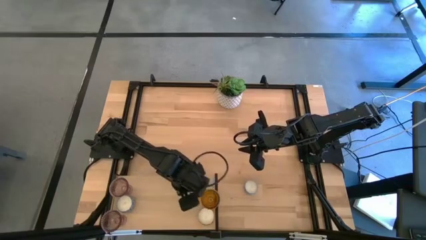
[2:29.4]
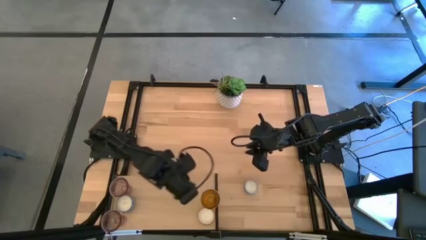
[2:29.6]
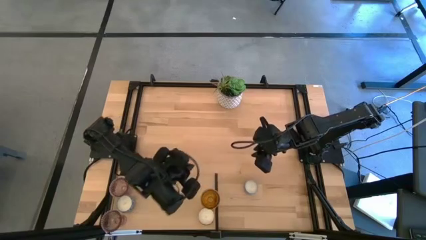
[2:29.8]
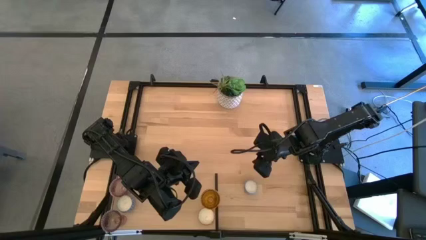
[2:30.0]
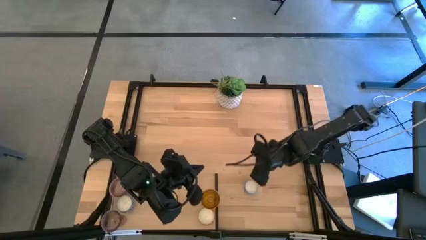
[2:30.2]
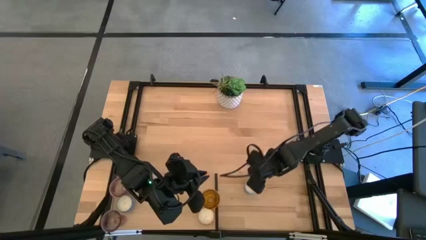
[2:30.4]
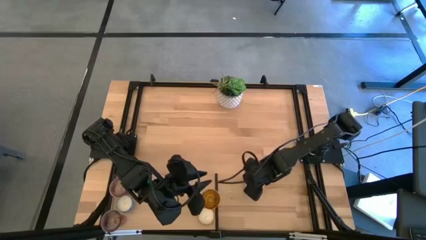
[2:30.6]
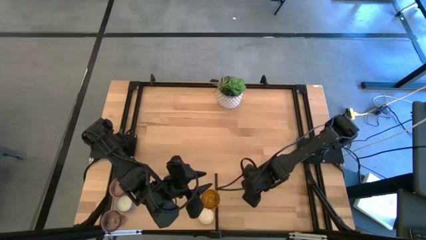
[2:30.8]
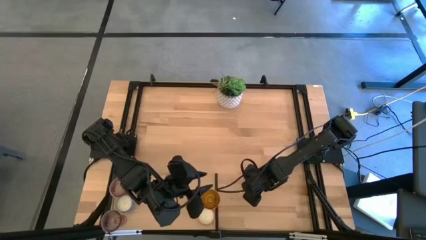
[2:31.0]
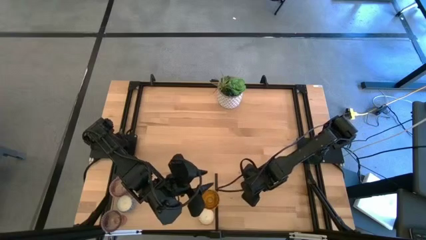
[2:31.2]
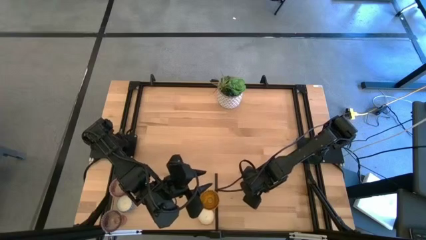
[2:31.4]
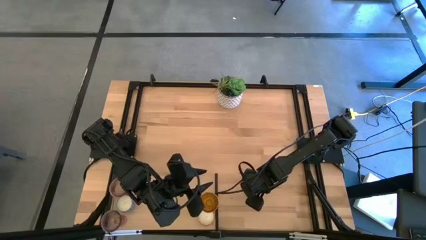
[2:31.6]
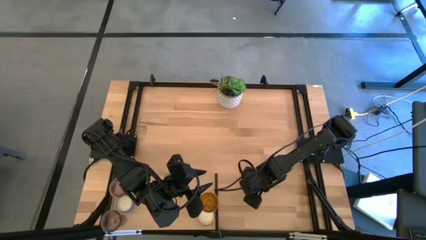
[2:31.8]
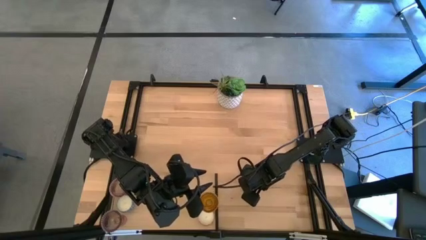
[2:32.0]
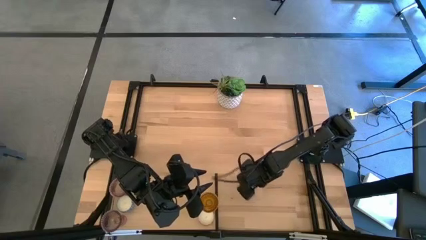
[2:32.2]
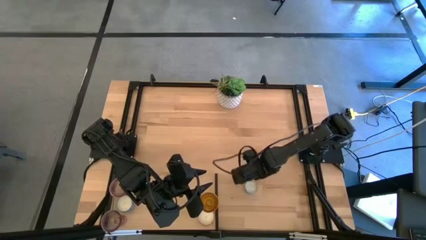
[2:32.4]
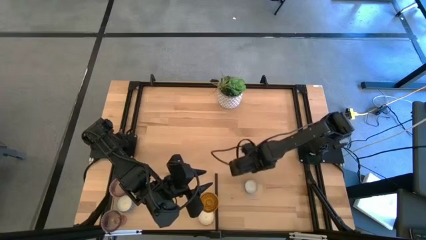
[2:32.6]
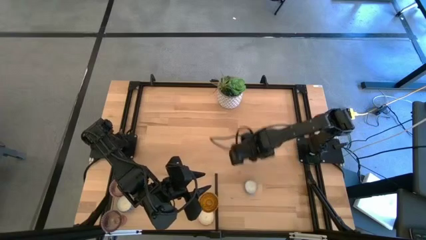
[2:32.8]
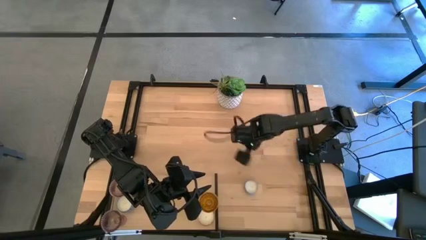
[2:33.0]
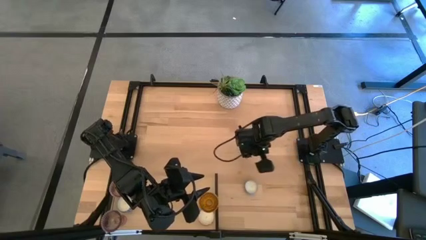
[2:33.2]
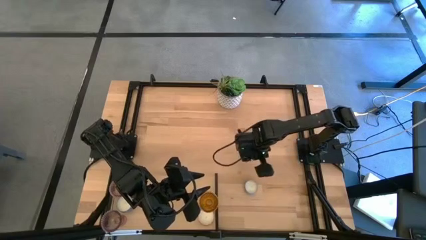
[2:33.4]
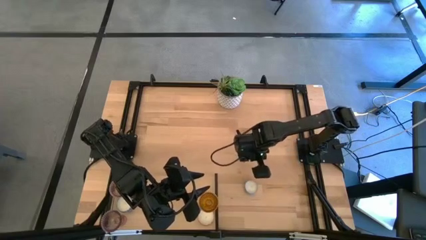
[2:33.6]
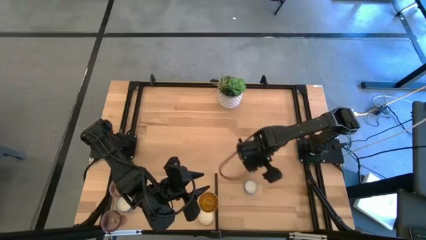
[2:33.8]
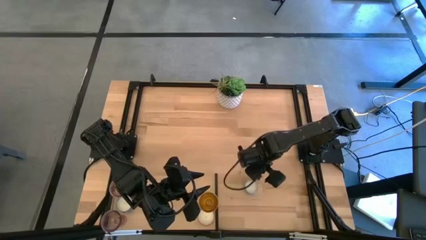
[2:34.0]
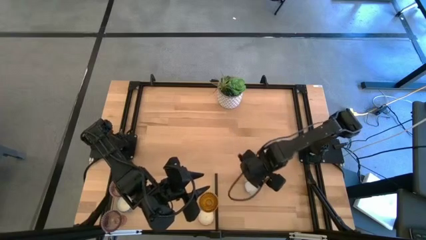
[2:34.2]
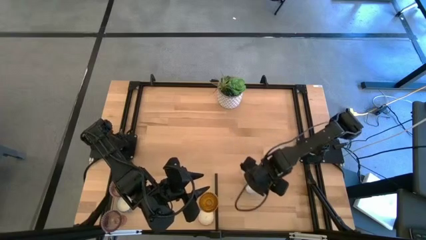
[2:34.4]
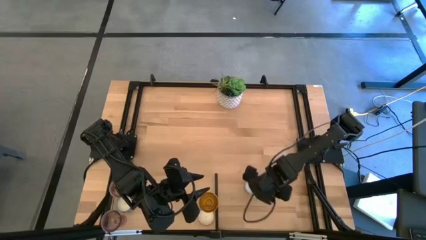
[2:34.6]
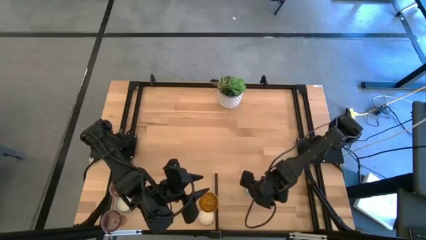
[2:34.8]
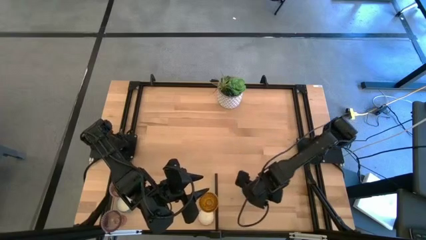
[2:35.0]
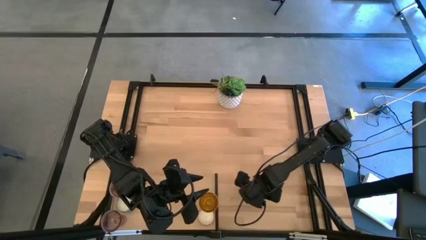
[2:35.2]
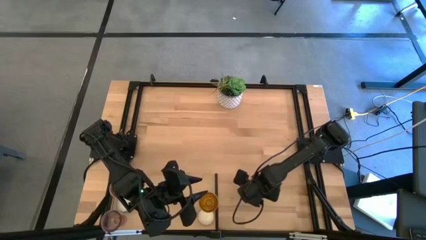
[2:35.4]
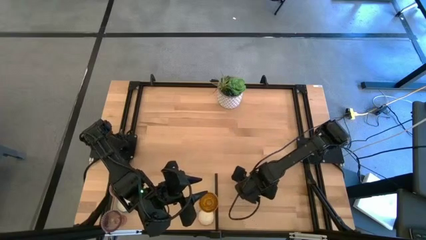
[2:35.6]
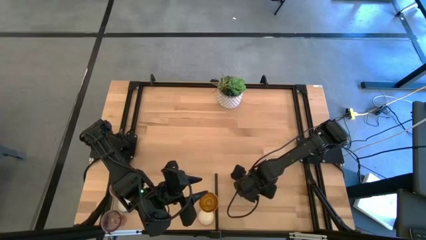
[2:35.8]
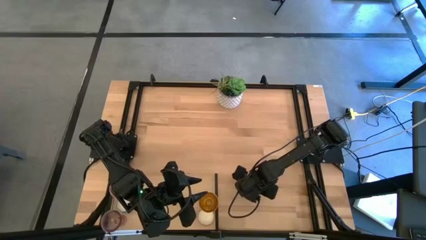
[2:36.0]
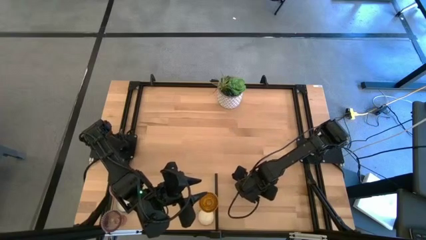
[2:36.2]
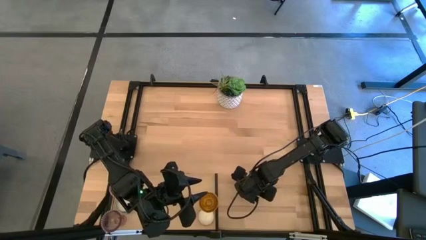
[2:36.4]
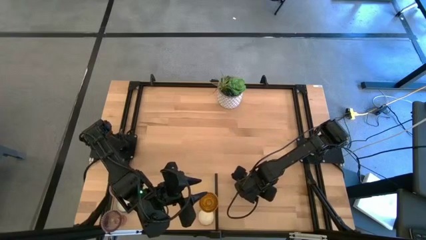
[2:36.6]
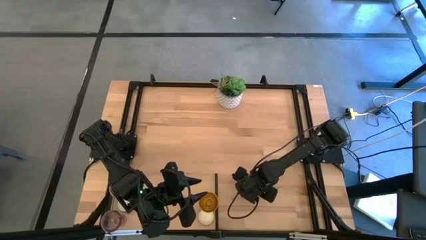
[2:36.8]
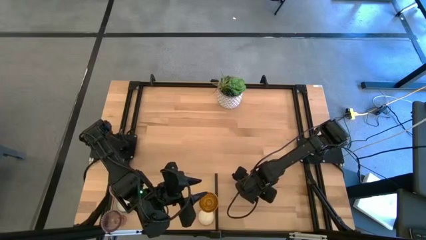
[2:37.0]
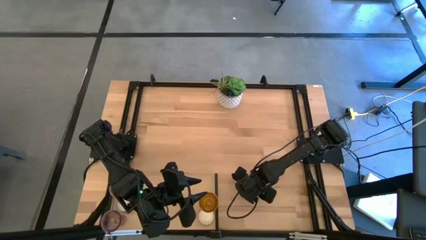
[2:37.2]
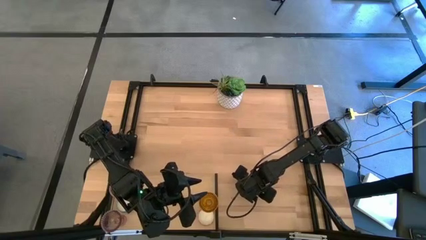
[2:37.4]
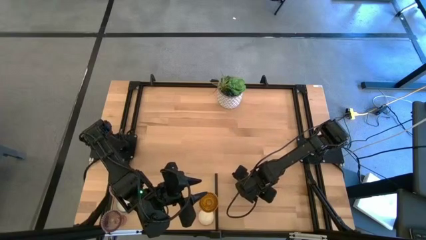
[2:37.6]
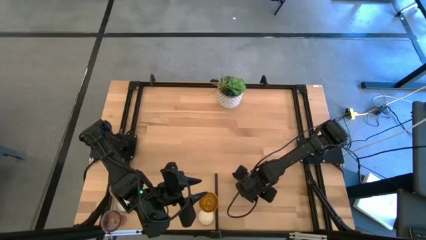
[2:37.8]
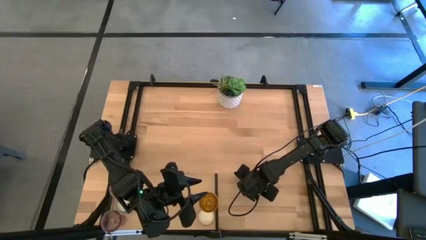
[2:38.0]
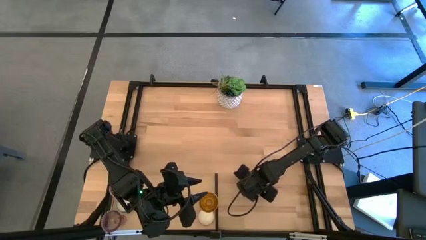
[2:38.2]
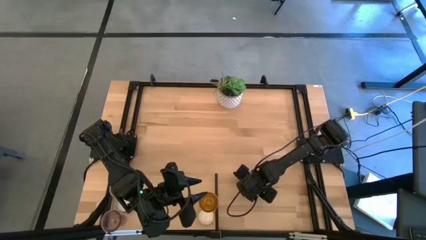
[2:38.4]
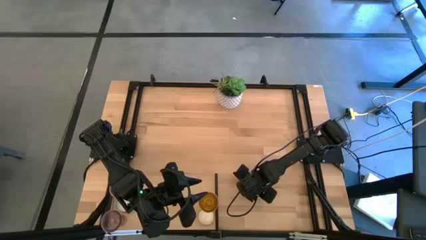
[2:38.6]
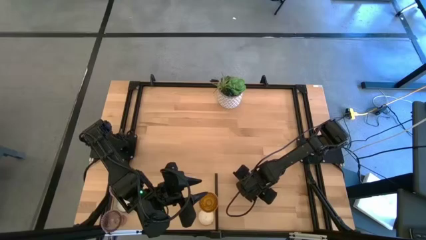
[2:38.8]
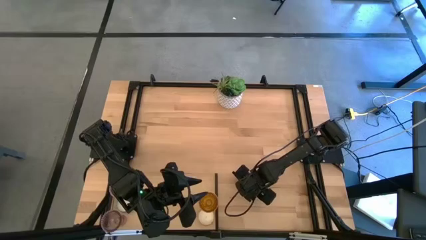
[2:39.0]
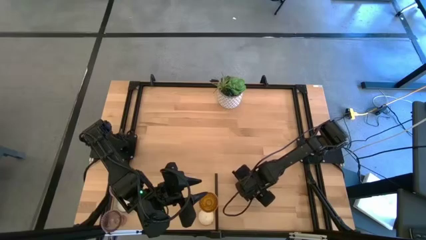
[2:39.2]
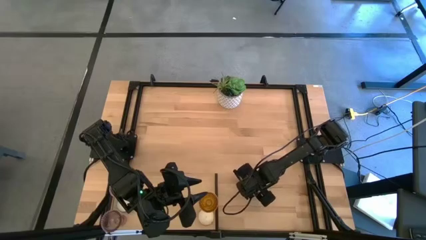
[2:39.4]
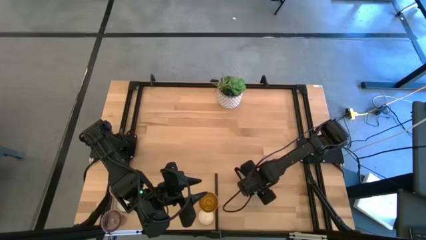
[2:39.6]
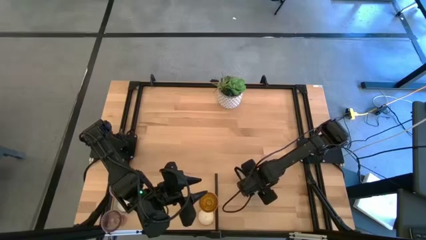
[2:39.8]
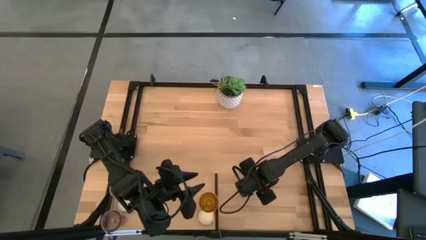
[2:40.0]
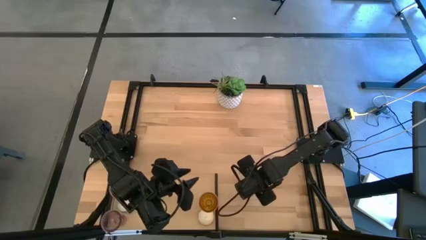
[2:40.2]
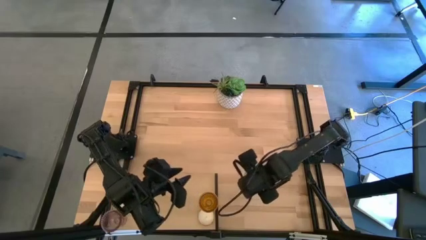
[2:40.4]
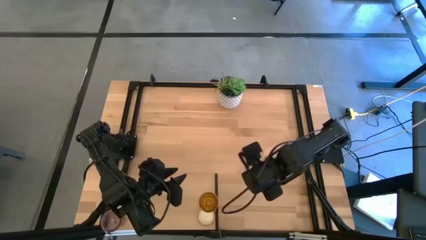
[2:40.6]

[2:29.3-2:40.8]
Task: Pick & Place candle stick holders
Put the blue scented candle on the shelf

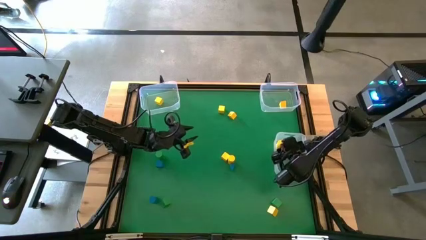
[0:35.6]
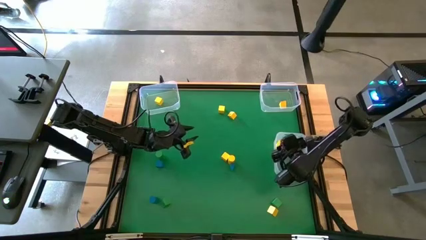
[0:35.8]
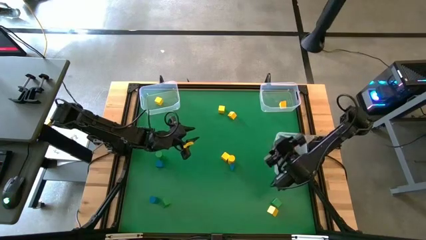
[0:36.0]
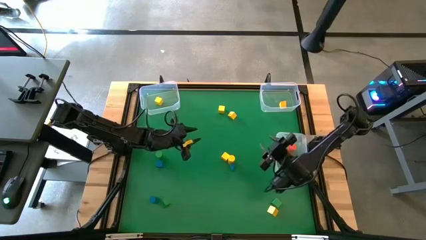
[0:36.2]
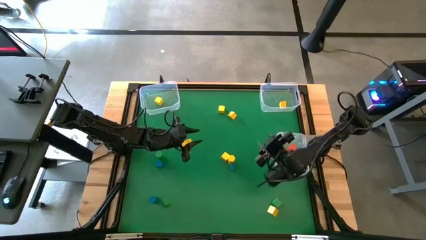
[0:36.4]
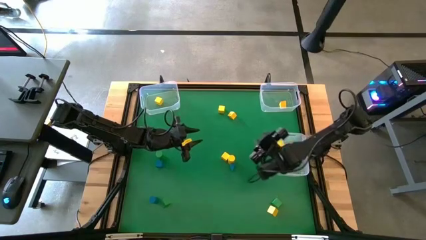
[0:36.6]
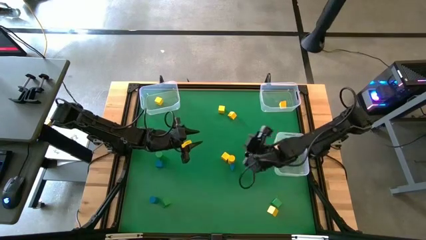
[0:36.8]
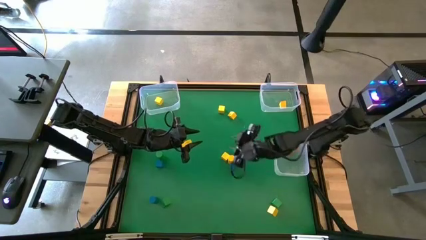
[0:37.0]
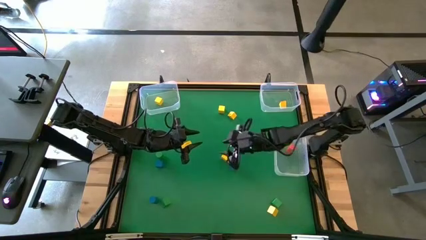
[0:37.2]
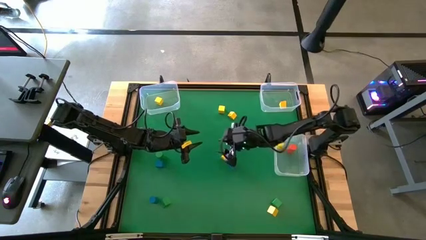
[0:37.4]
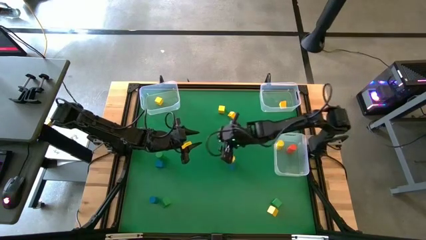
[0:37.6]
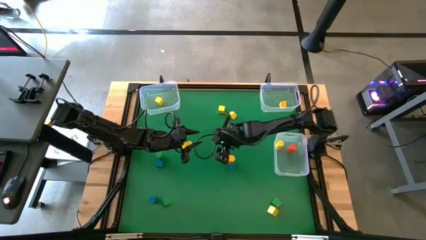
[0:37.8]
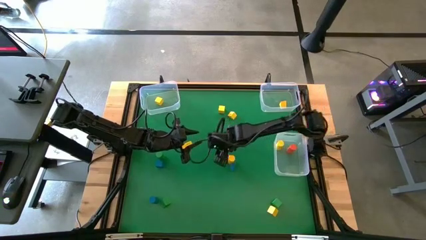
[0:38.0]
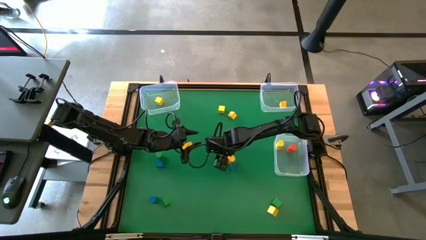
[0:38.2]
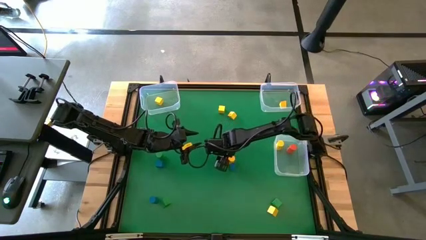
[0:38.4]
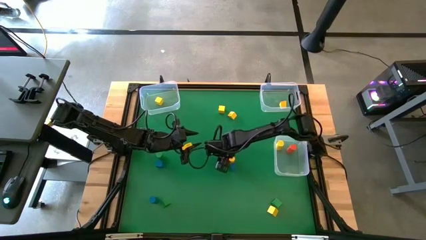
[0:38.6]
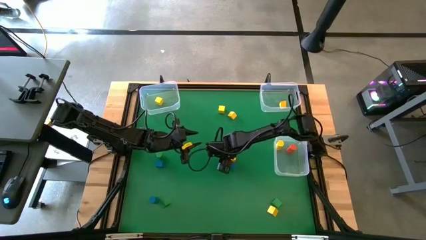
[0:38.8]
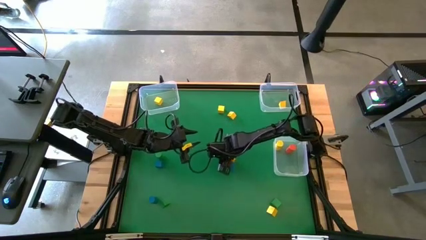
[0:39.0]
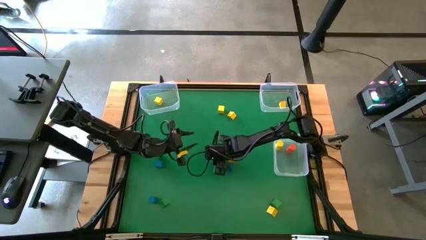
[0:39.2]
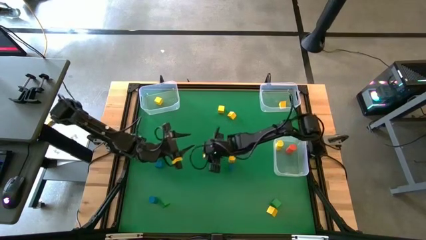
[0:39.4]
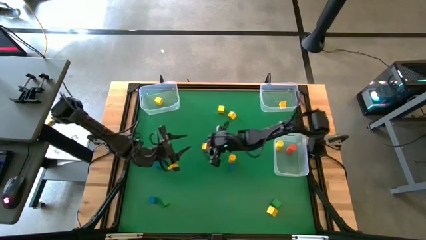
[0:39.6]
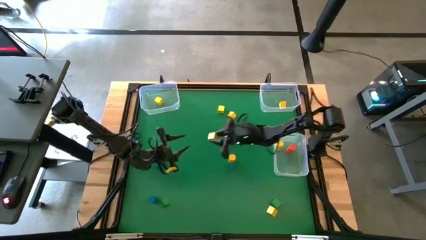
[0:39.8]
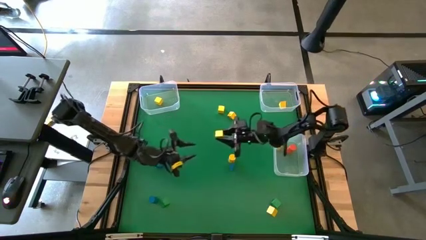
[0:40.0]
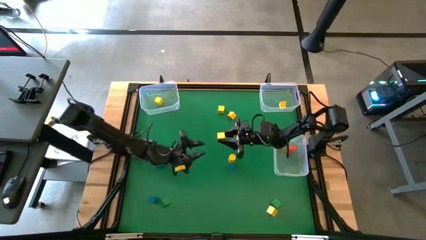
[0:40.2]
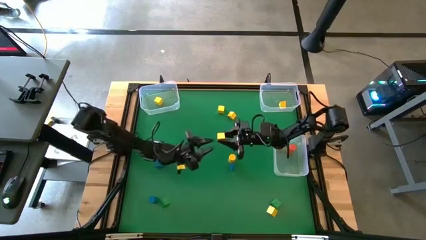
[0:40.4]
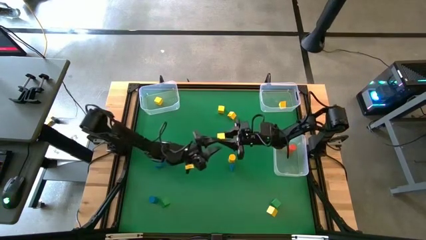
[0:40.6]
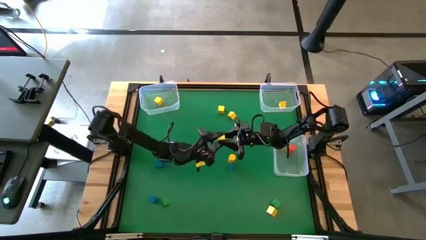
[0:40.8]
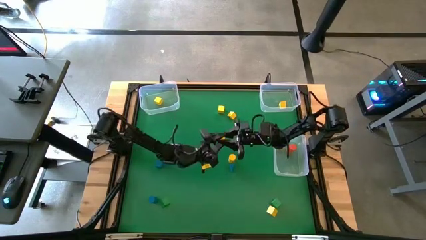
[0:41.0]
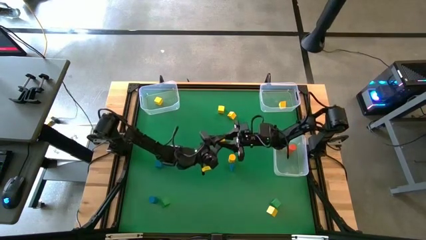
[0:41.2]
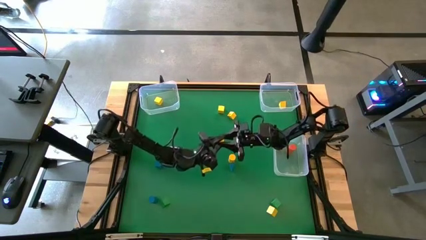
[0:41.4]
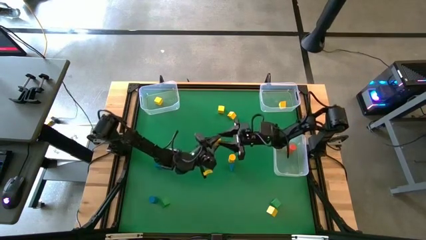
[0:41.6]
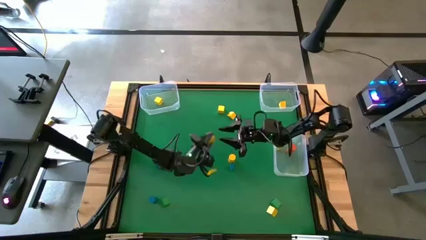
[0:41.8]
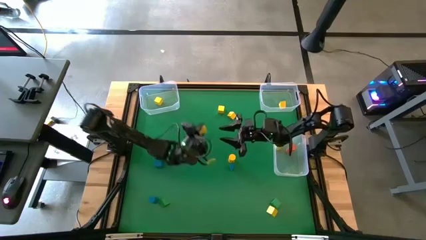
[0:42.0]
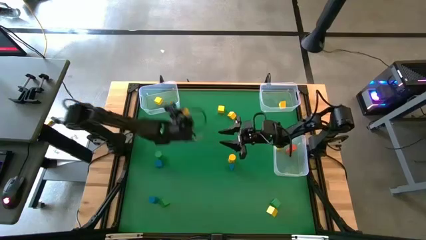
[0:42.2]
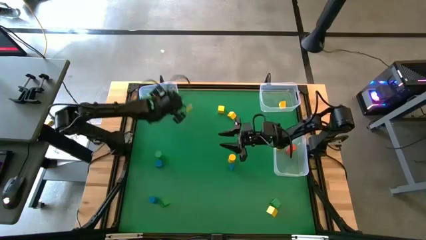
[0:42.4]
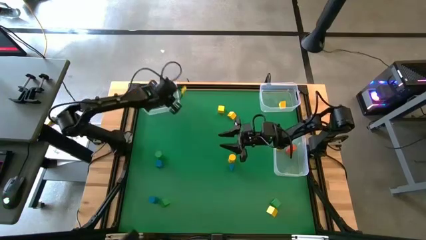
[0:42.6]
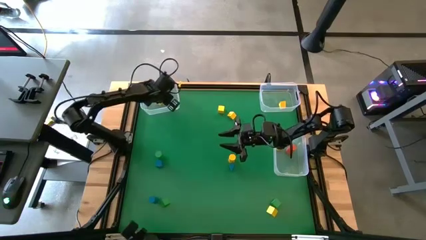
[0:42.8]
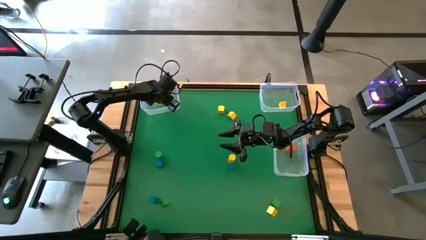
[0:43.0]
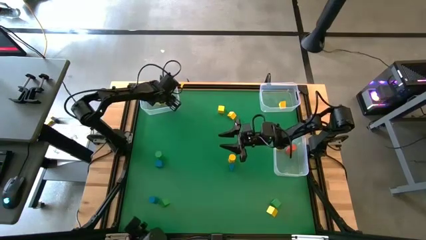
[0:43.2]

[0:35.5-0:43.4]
Task: Sort blocks by size
Put the yellow cube block into the top left transparent bin
